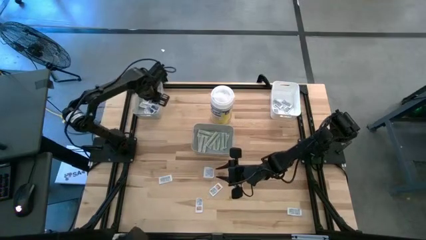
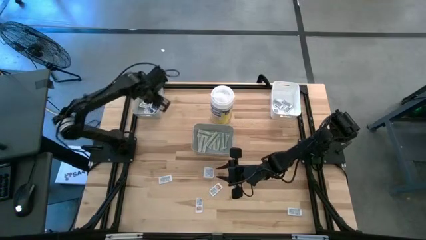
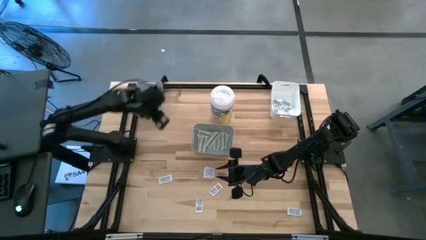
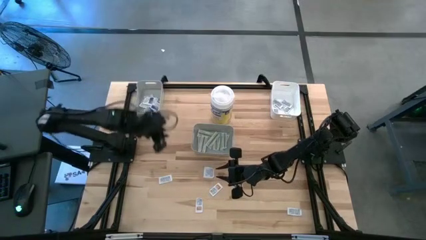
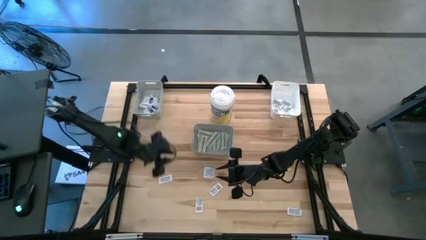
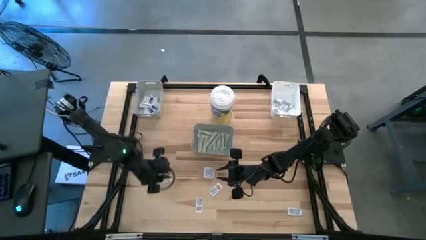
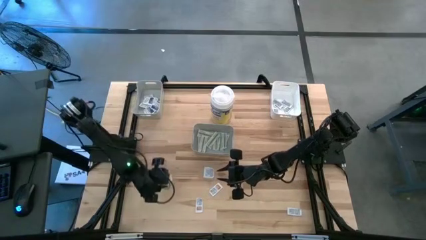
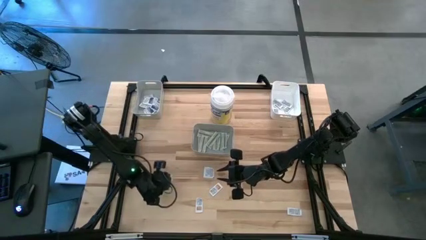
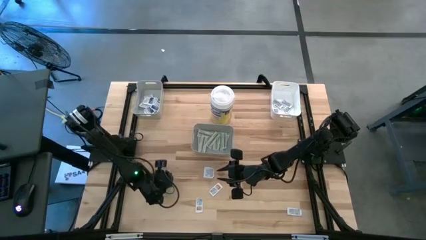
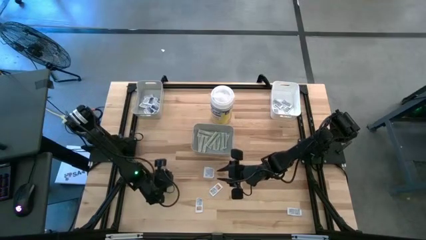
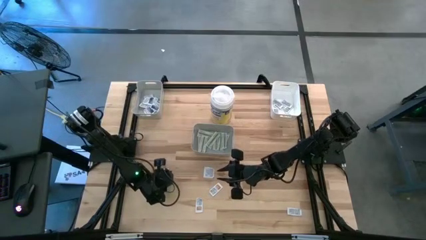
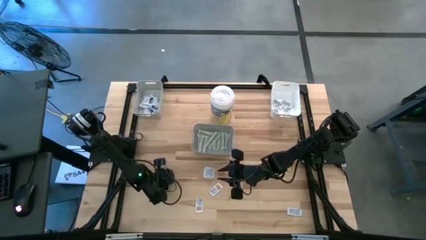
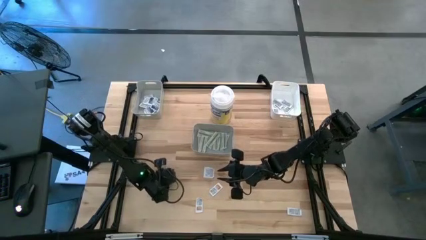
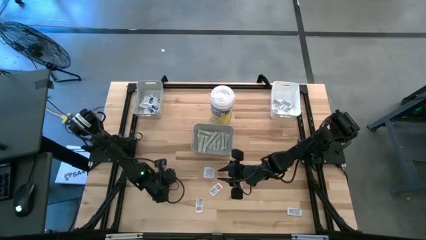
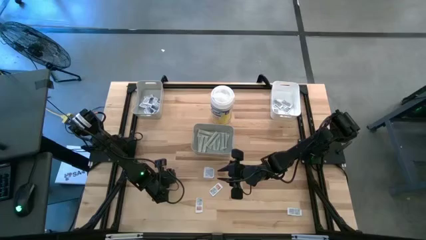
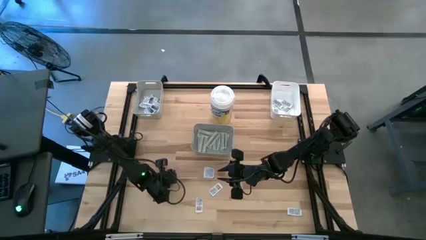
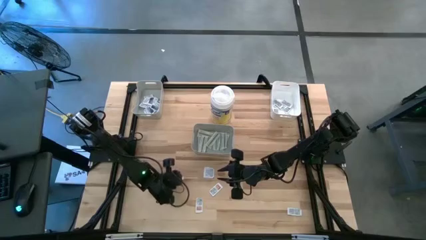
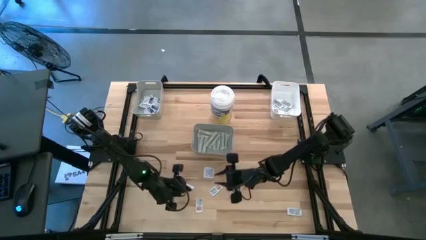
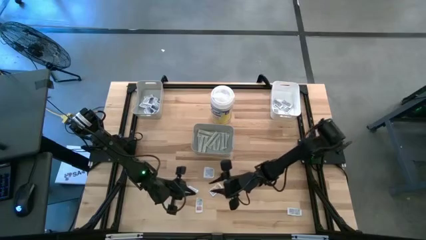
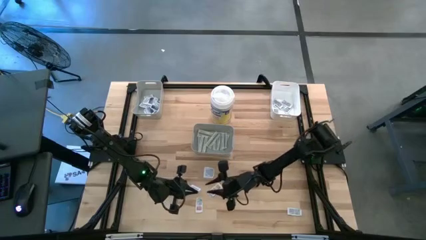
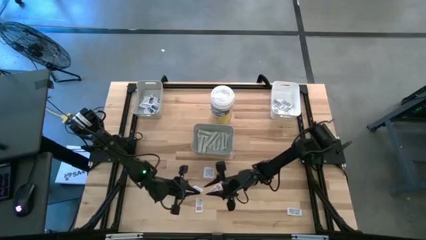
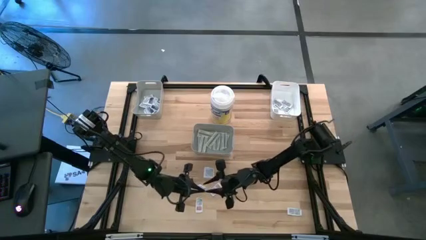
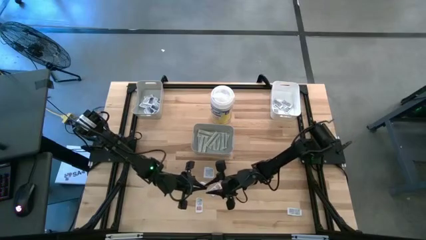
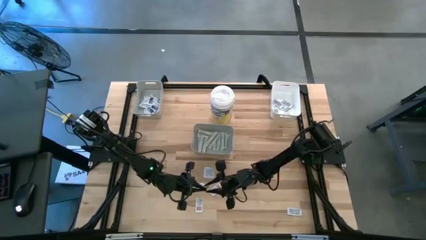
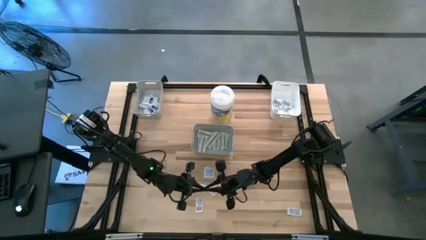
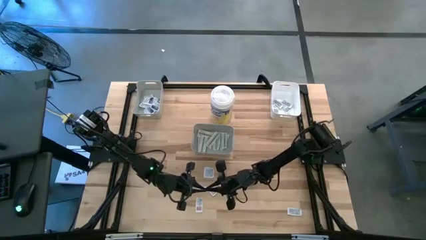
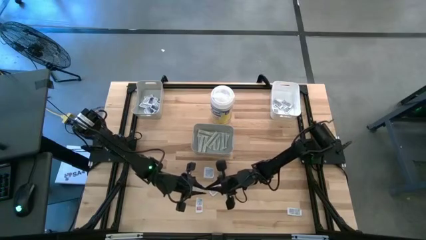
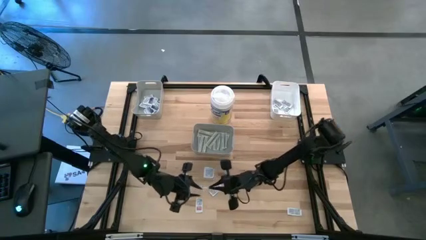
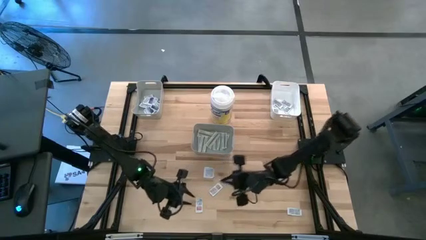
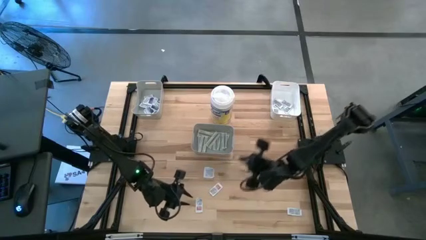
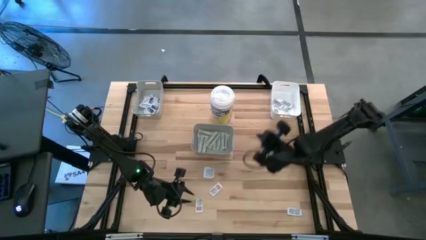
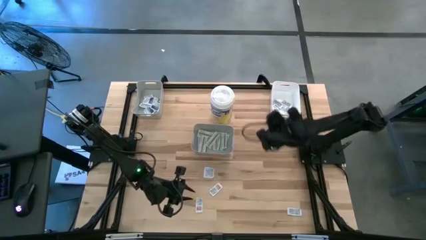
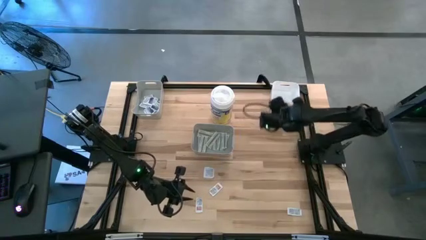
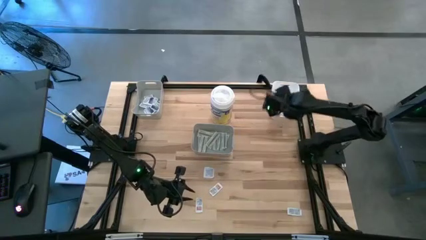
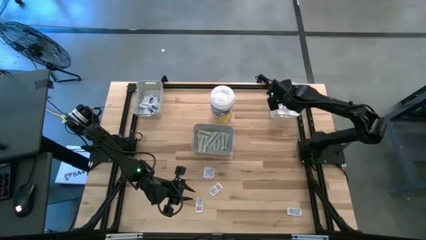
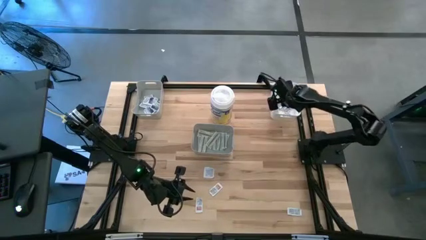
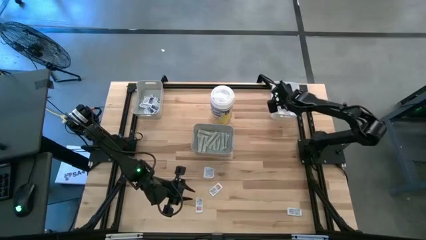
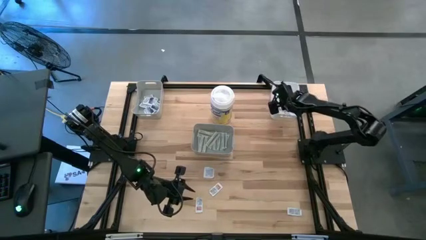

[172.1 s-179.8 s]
Task: Pick & Place First Aid Supplies
Put the ointment pack into the white bin

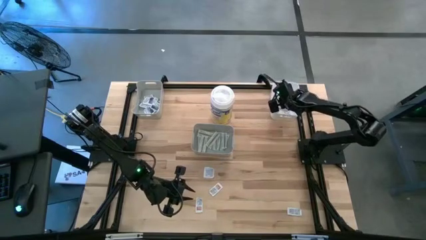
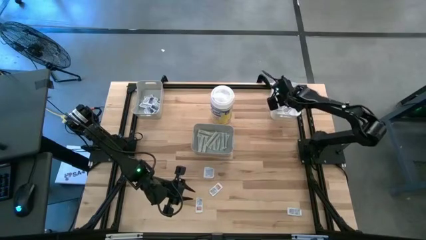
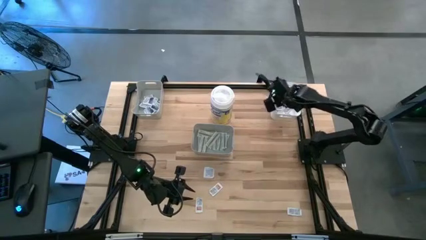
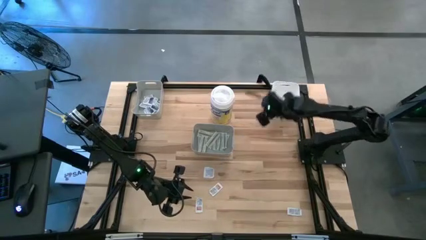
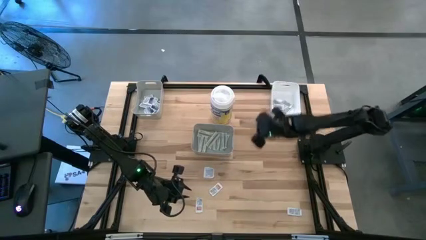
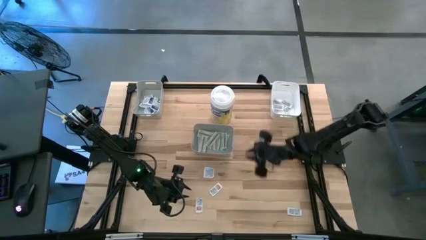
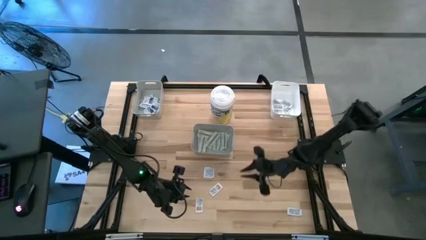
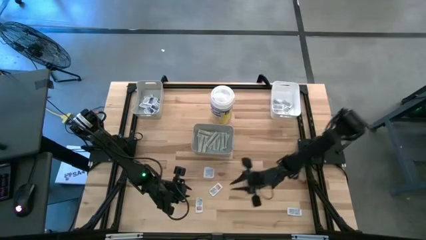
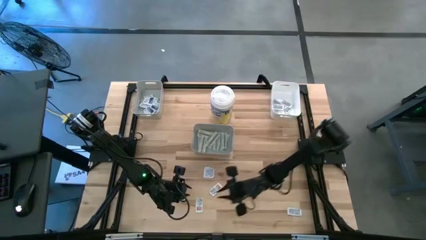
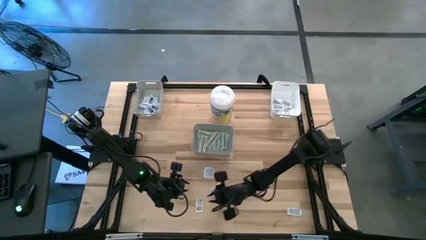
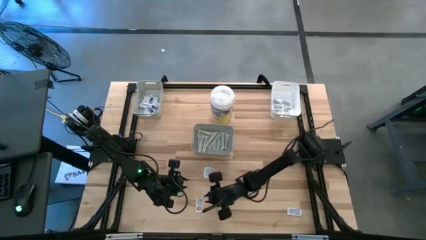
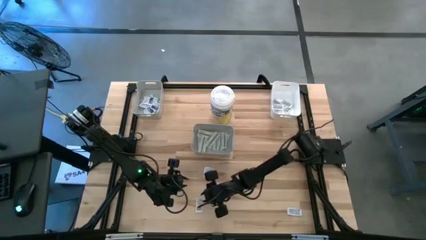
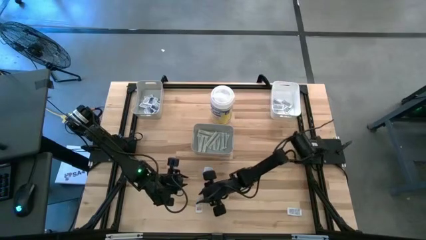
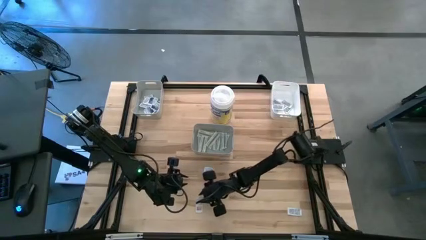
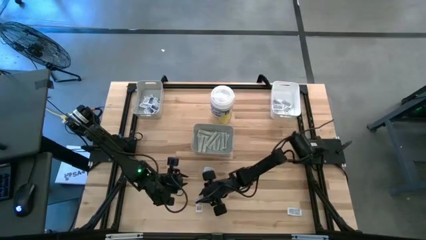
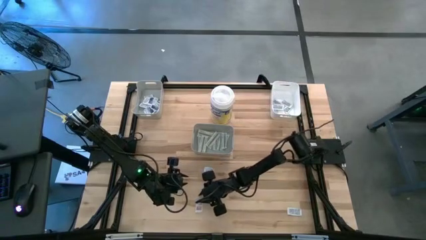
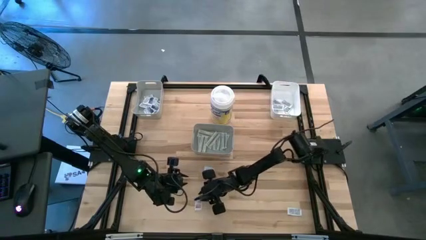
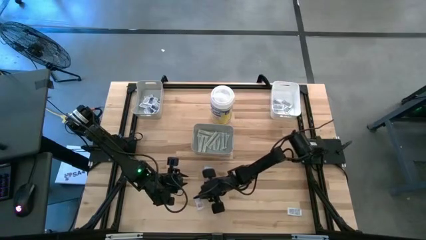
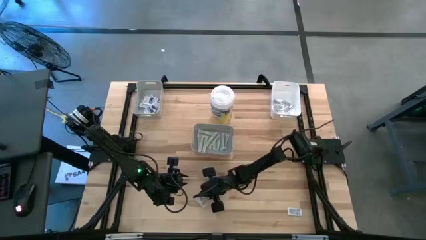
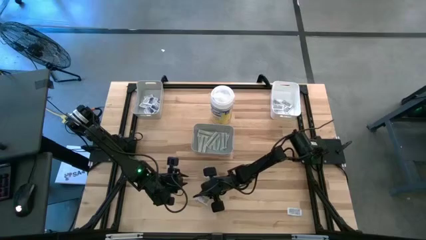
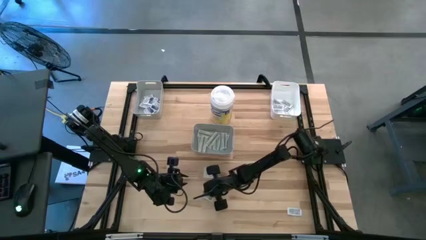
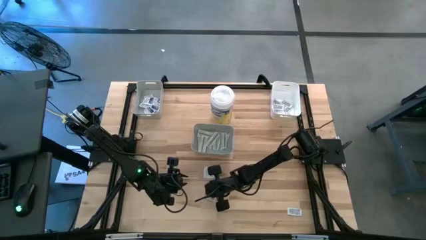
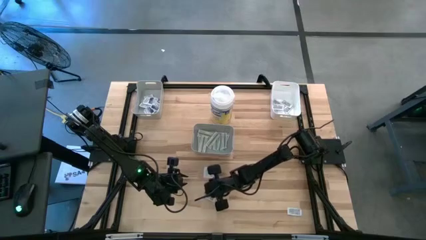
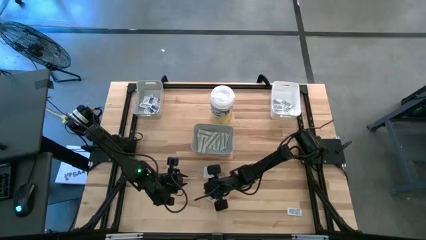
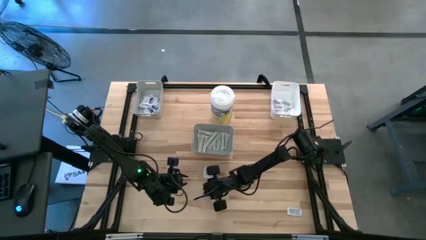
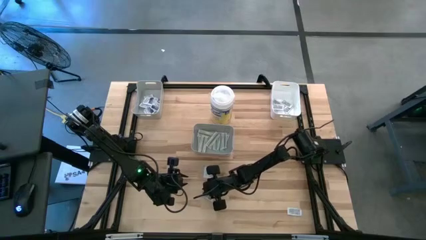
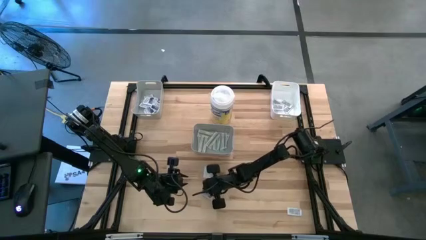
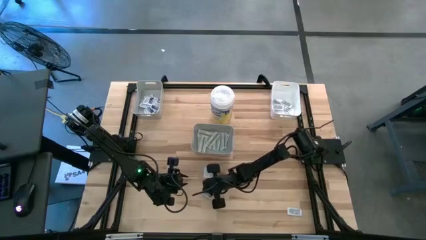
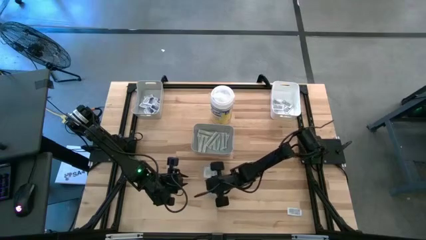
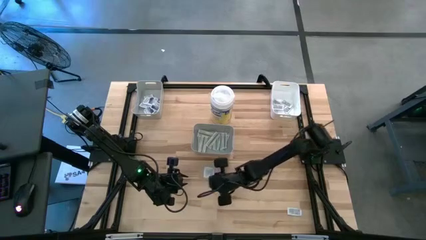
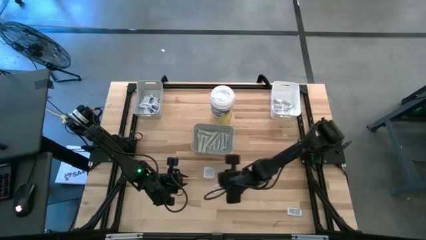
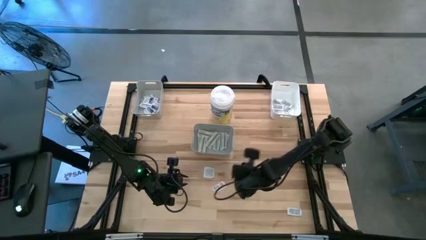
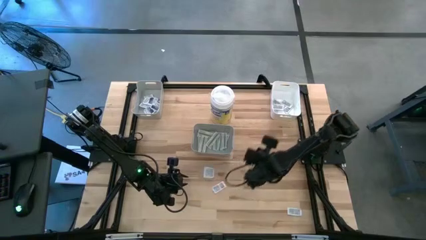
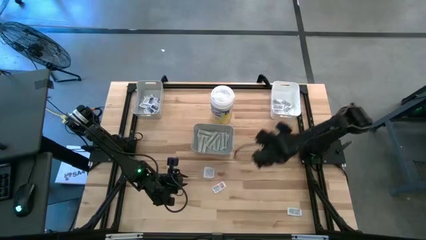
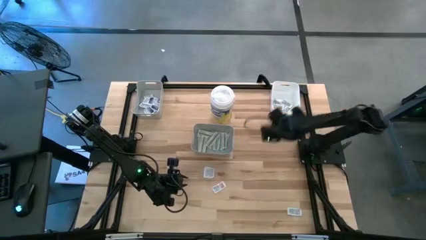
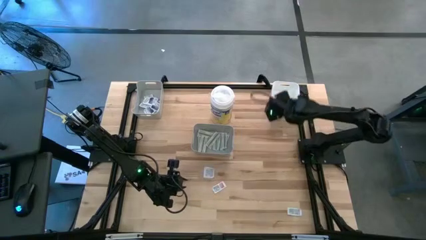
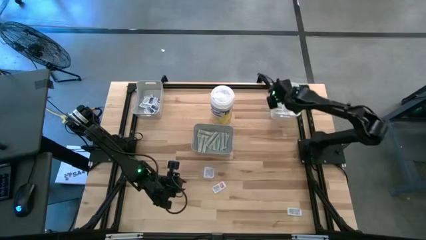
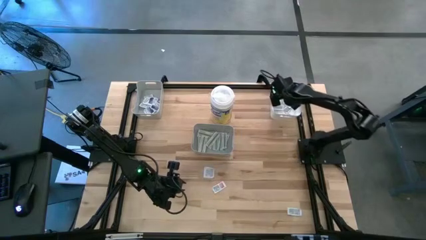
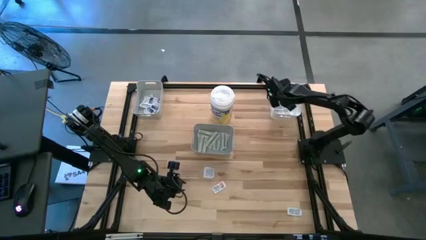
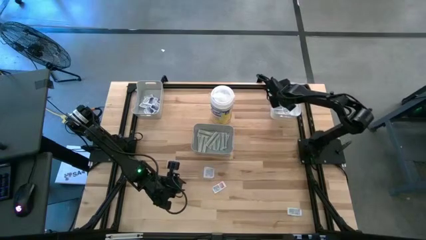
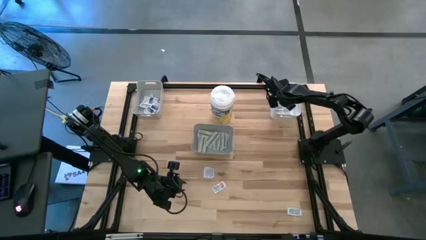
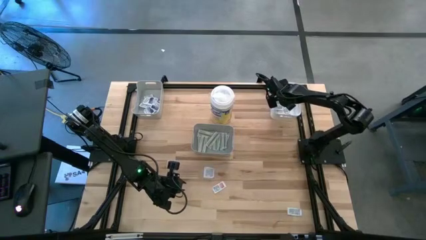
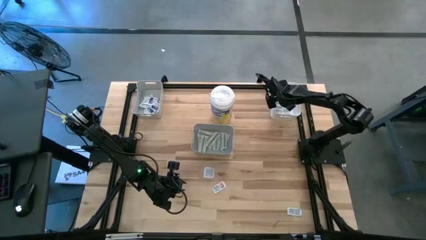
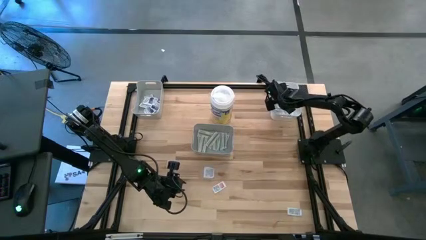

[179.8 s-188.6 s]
Put the ointment pack into the white bin
